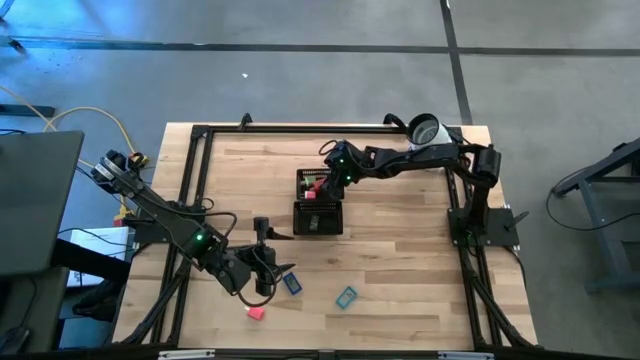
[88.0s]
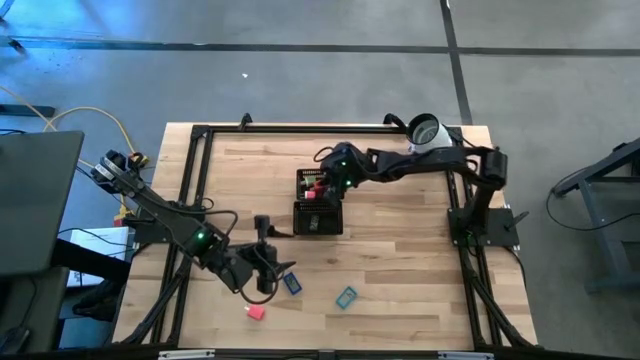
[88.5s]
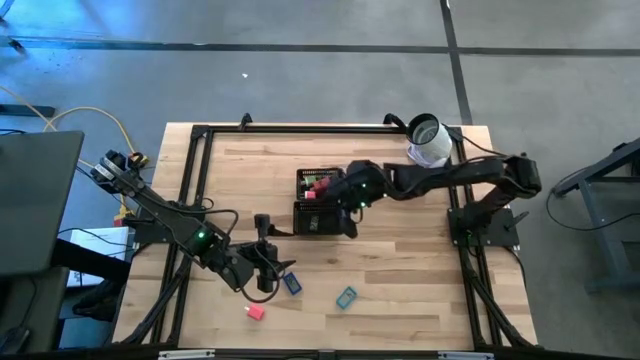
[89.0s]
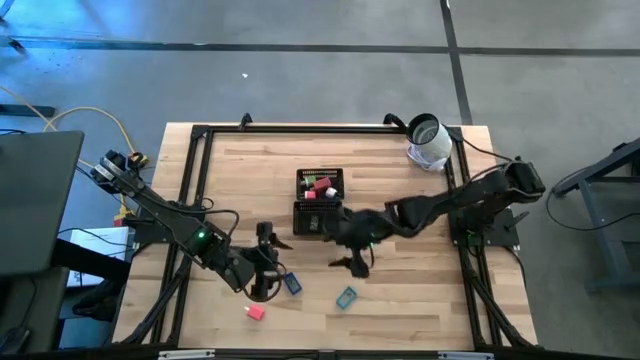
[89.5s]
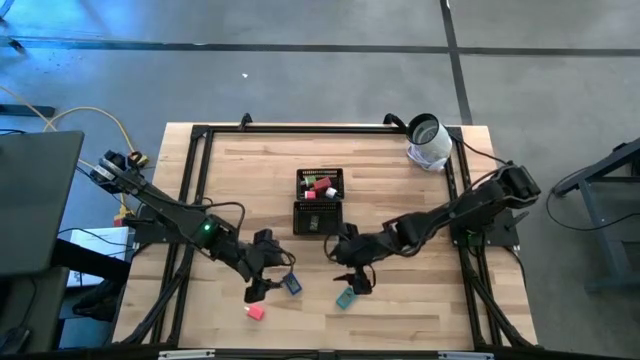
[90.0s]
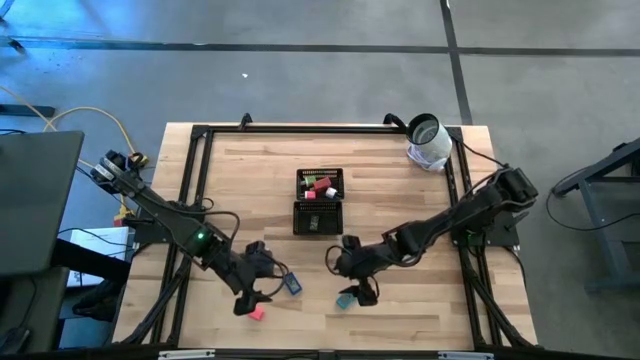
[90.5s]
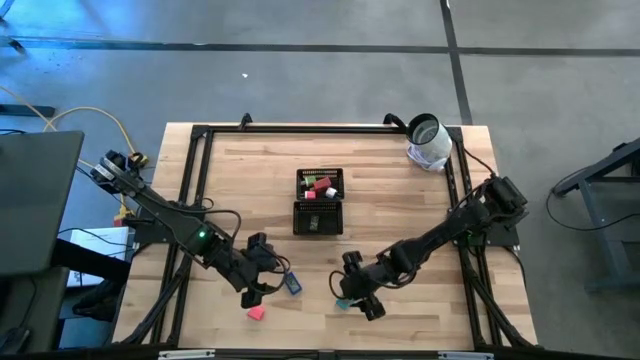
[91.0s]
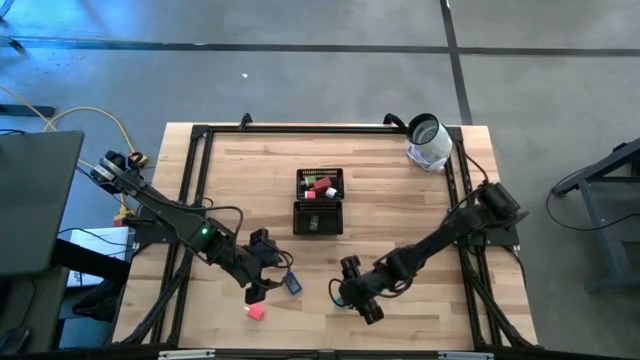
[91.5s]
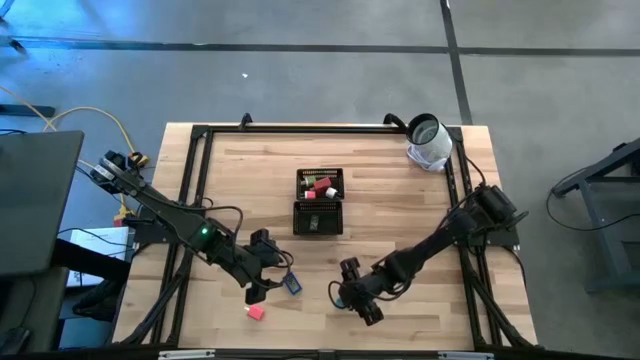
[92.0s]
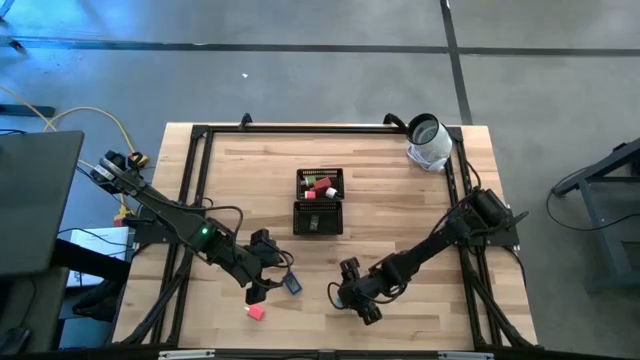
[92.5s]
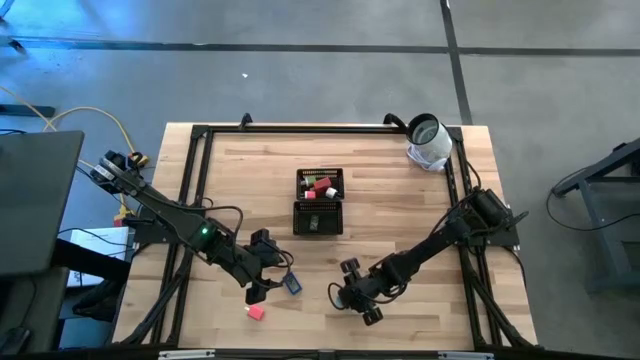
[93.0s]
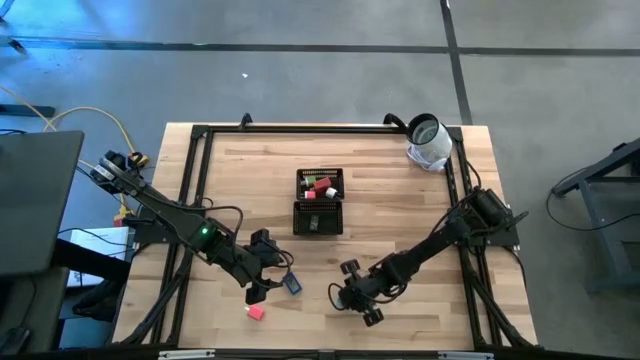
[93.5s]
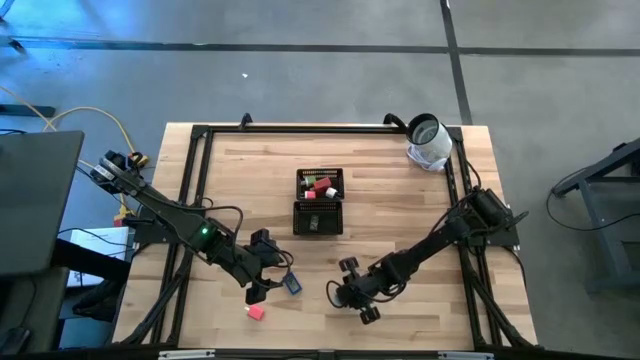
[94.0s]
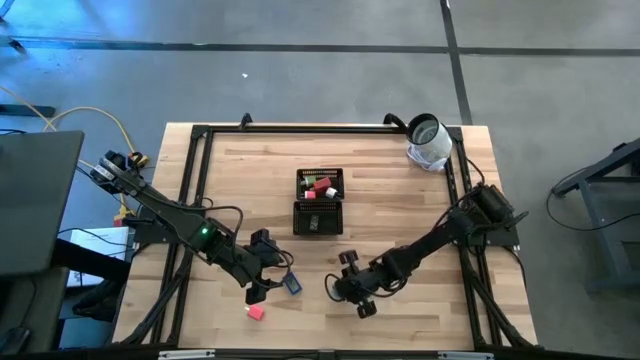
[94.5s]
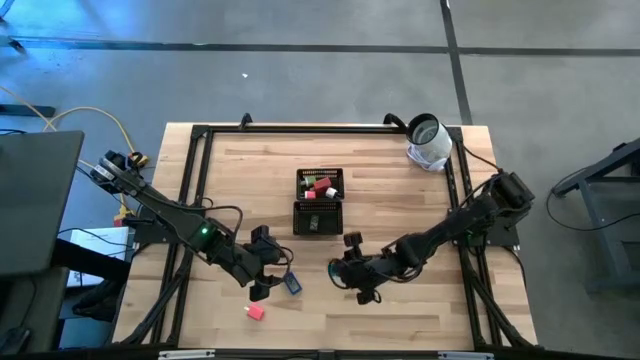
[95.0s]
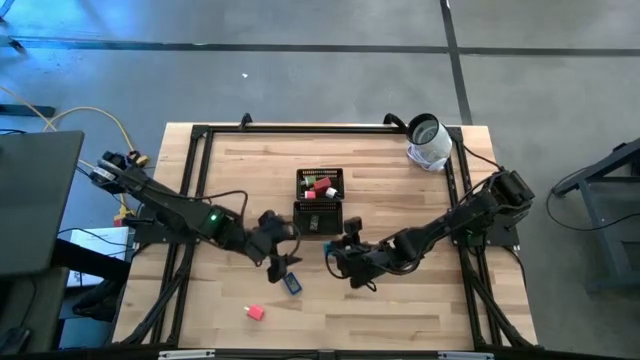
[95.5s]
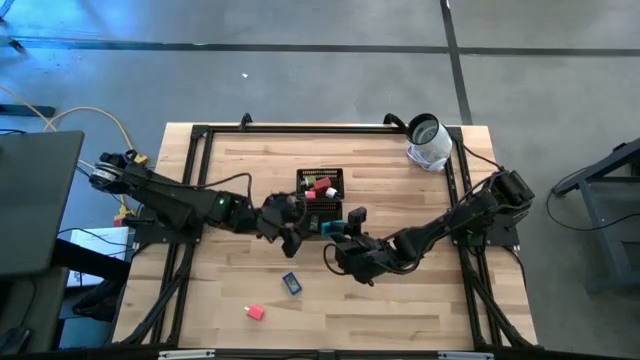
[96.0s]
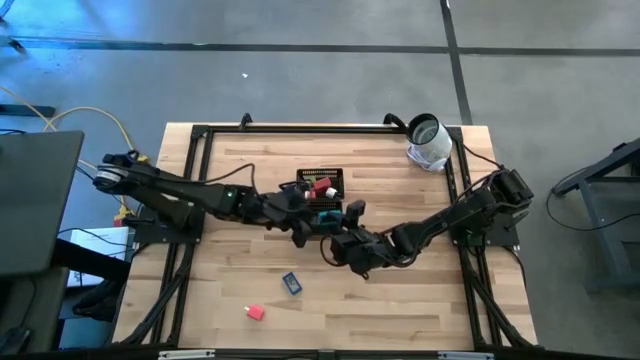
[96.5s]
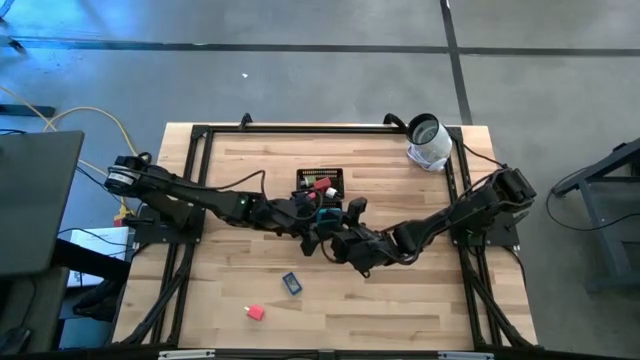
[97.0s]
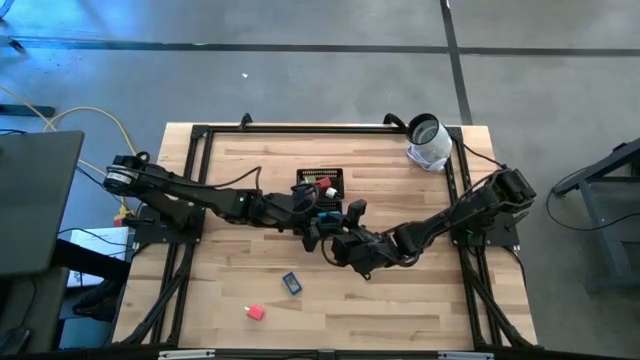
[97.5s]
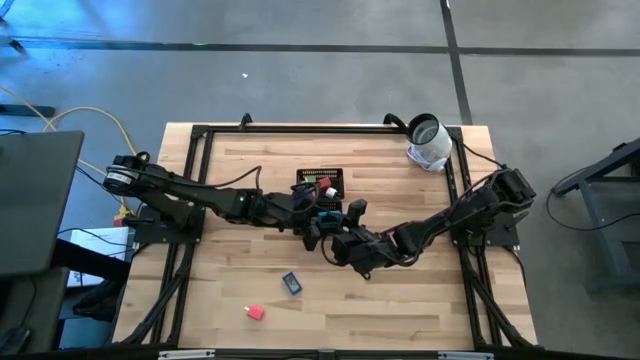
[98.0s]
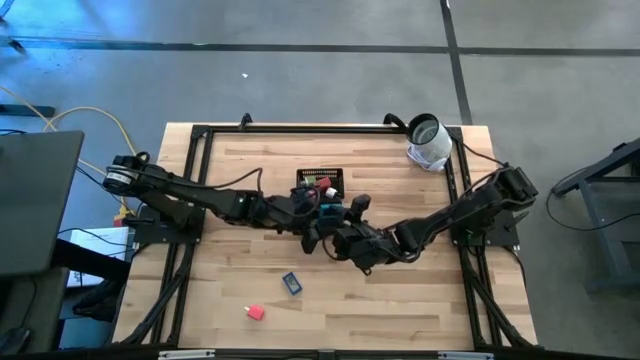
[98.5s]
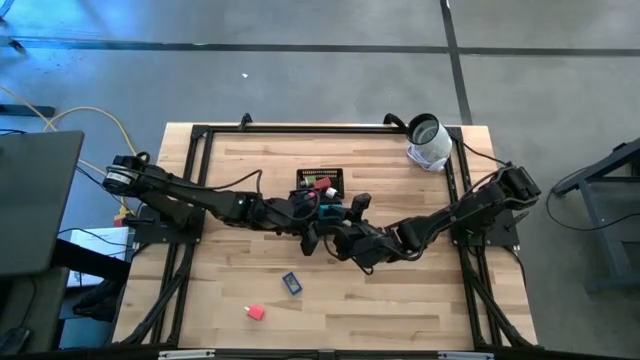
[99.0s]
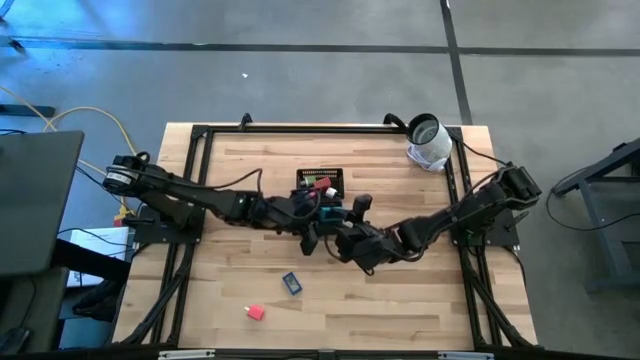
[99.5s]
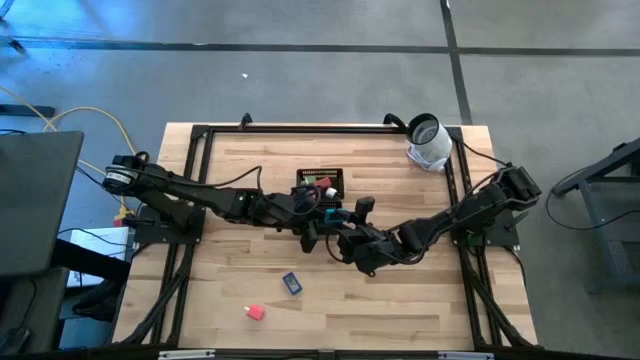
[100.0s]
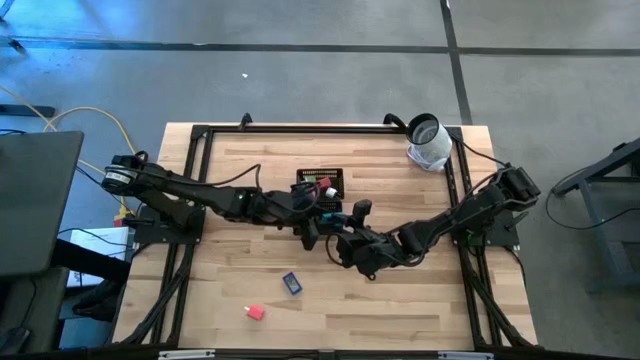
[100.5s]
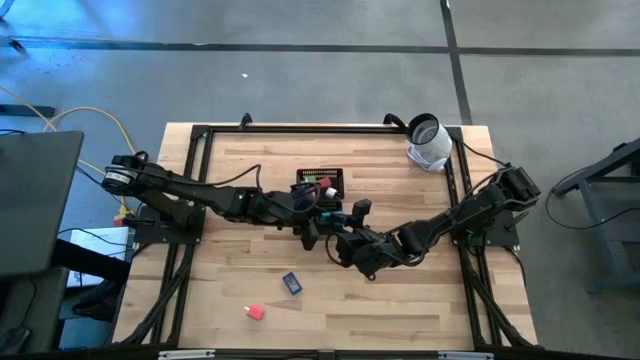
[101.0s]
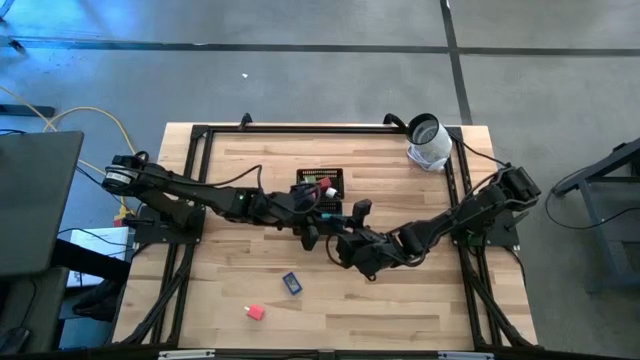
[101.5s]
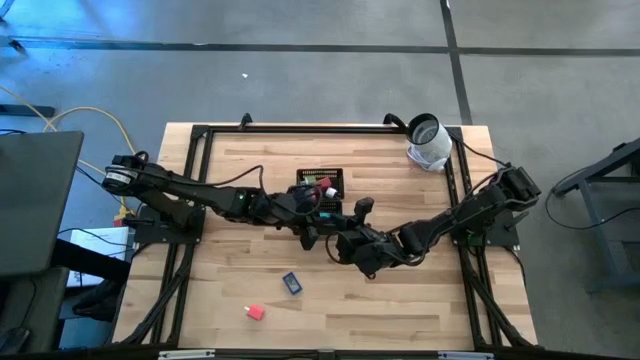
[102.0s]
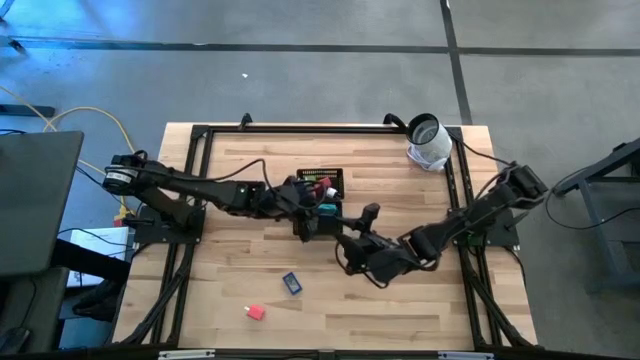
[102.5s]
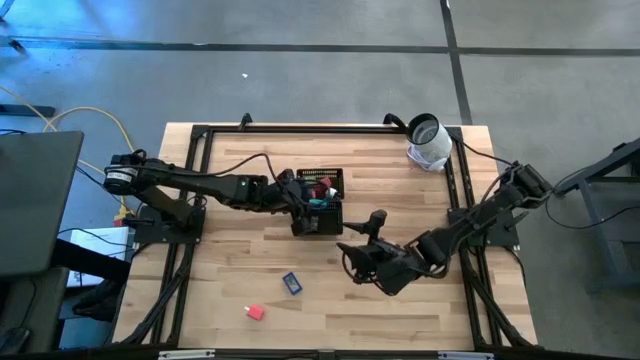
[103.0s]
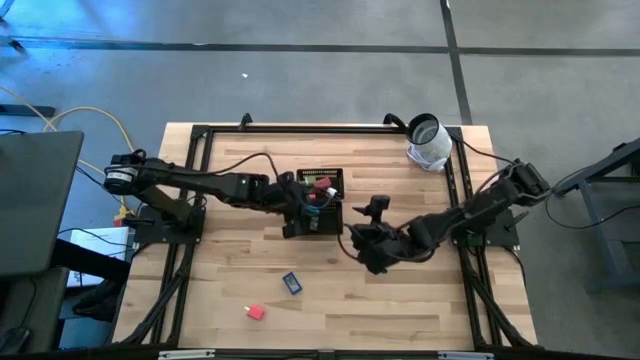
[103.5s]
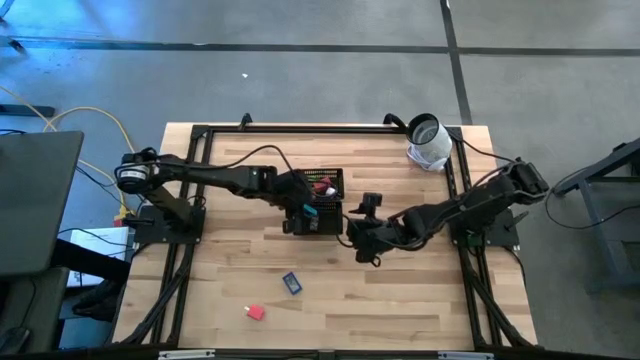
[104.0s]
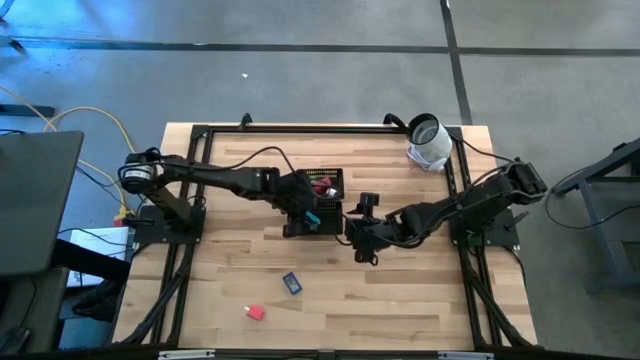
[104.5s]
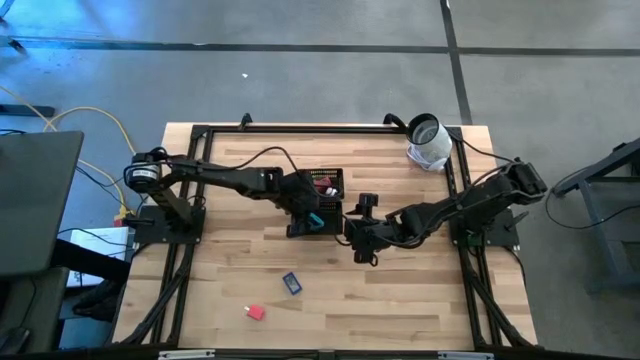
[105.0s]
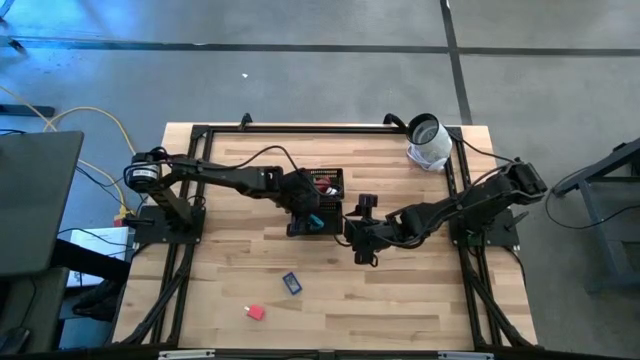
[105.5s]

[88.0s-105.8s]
Task: Pick & Place Office items
Put the light blue digital clock into the bottom black bin

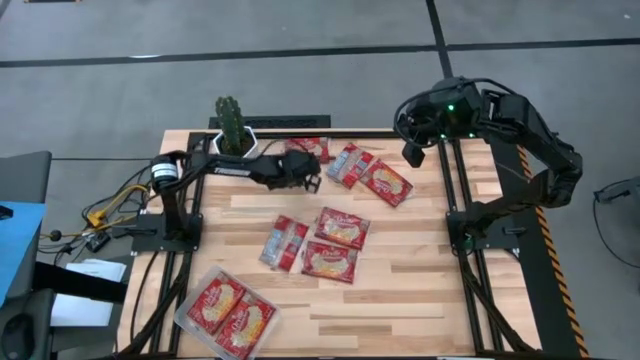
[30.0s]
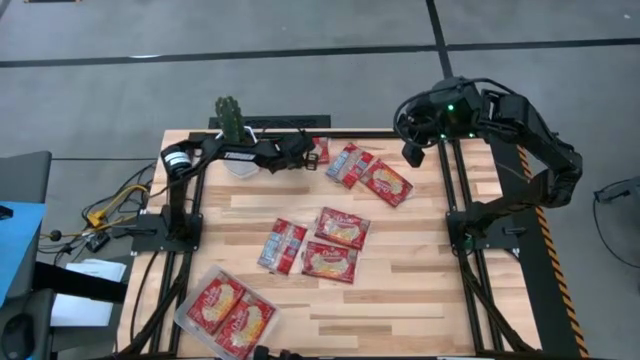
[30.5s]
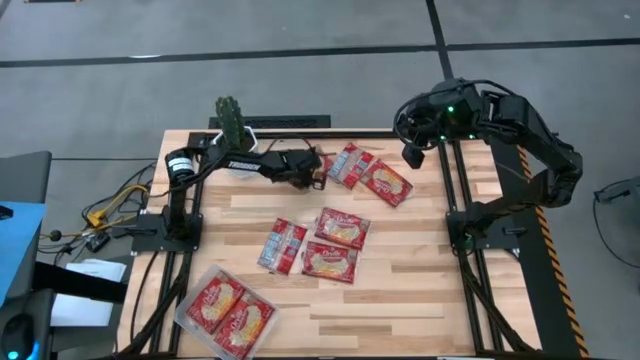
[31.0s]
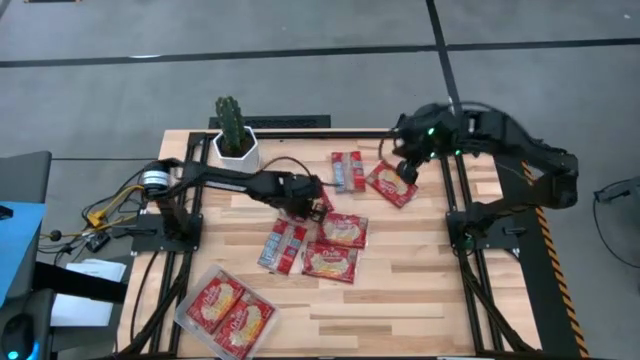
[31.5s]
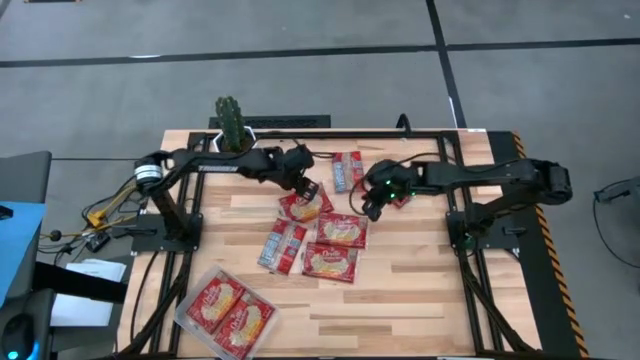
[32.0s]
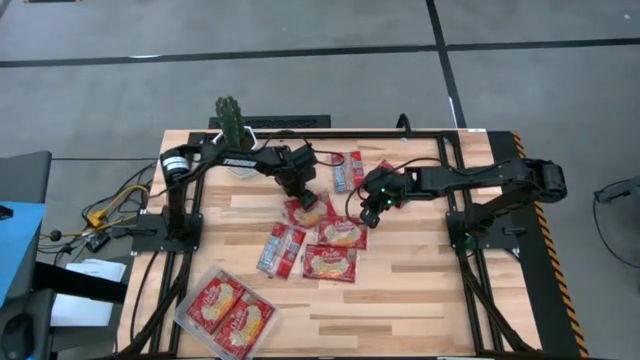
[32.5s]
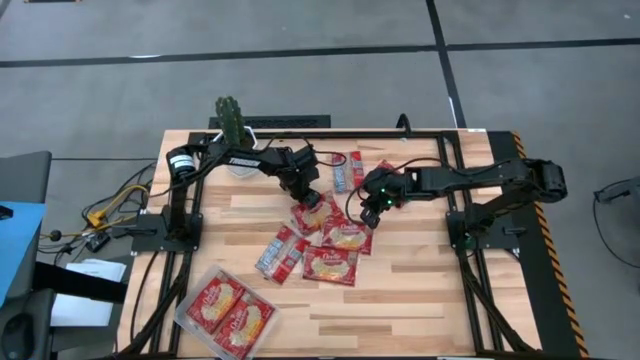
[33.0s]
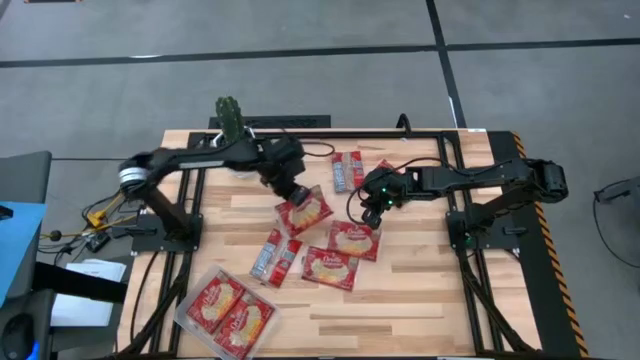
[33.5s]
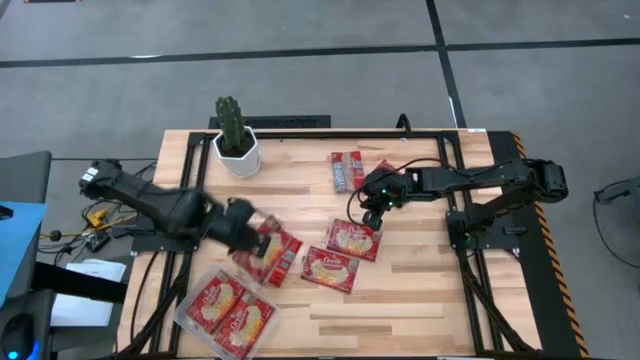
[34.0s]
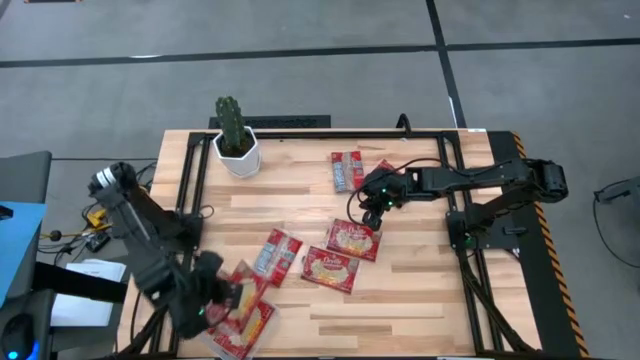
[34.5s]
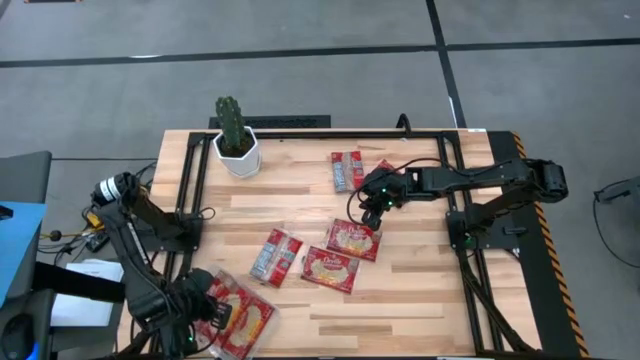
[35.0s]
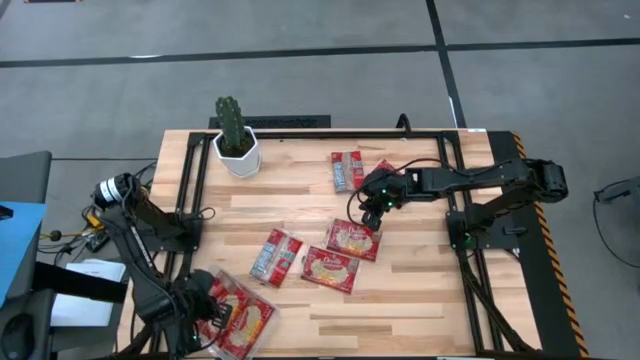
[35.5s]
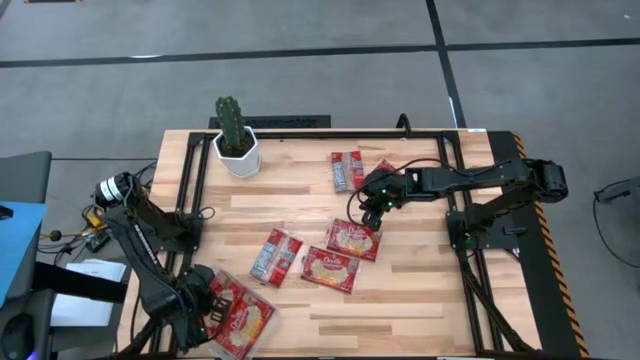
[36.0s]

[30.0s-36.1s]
Task: Sort popcorn bags into baskets
Put the red popcorn bag into the transparent bin
